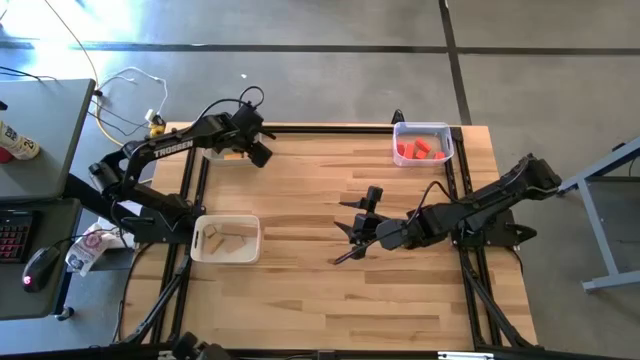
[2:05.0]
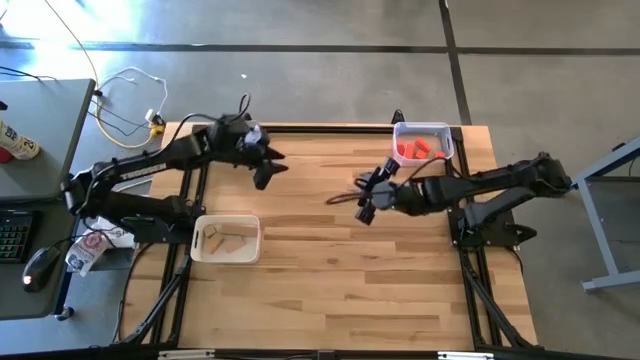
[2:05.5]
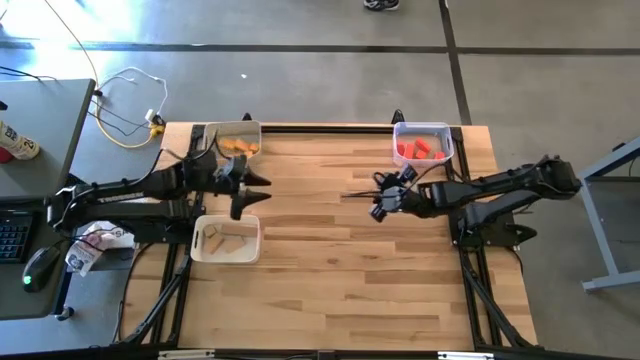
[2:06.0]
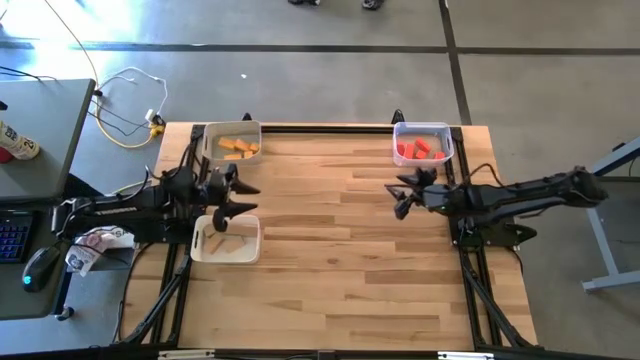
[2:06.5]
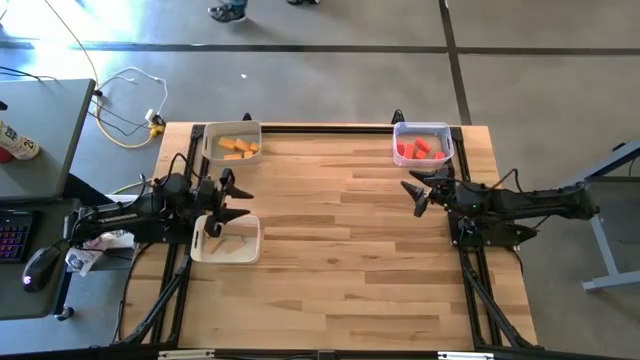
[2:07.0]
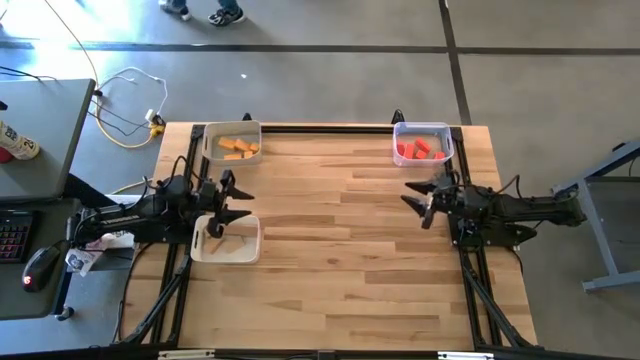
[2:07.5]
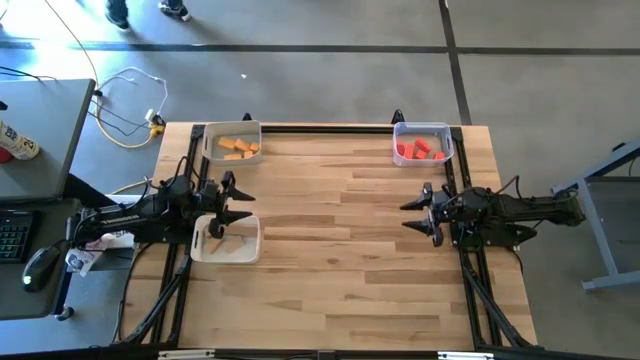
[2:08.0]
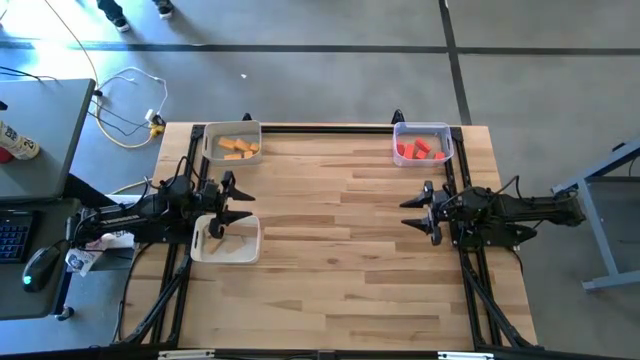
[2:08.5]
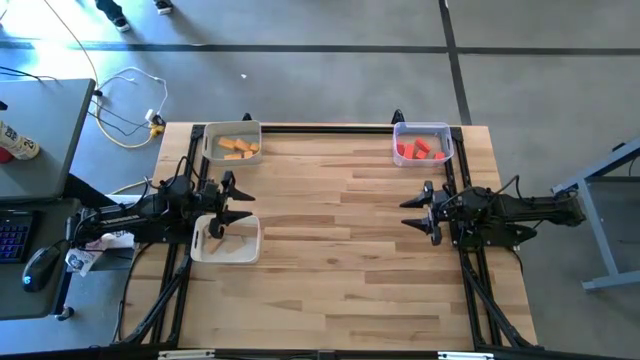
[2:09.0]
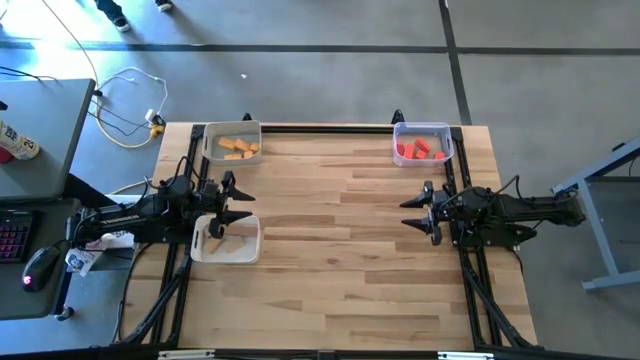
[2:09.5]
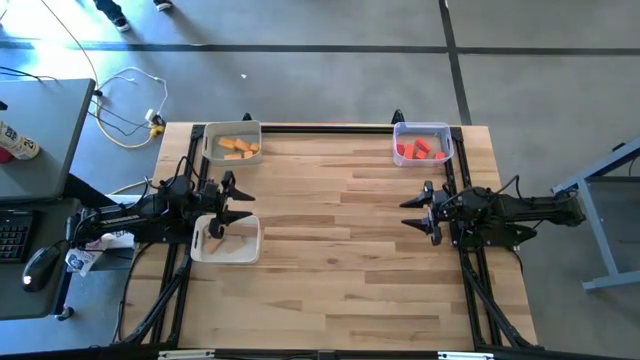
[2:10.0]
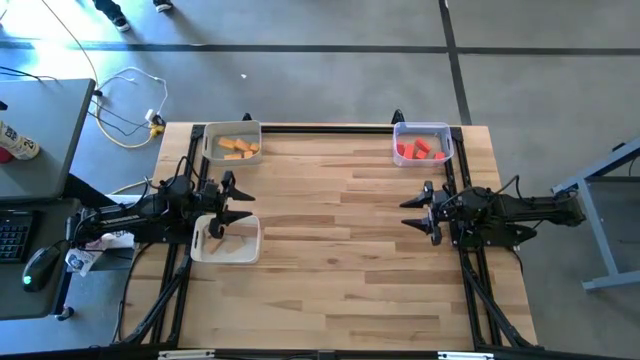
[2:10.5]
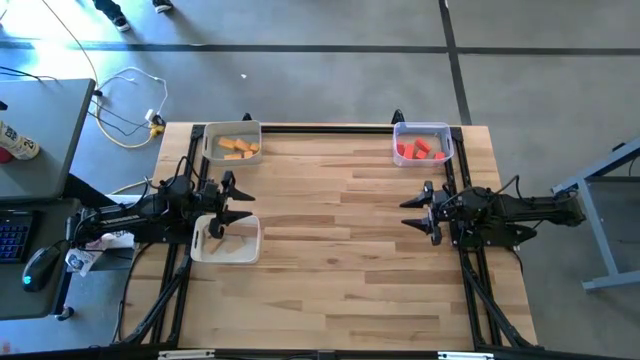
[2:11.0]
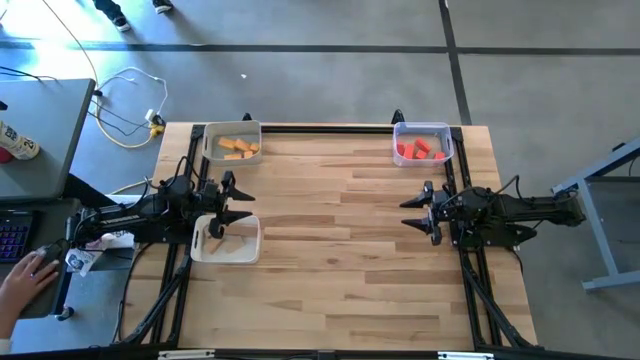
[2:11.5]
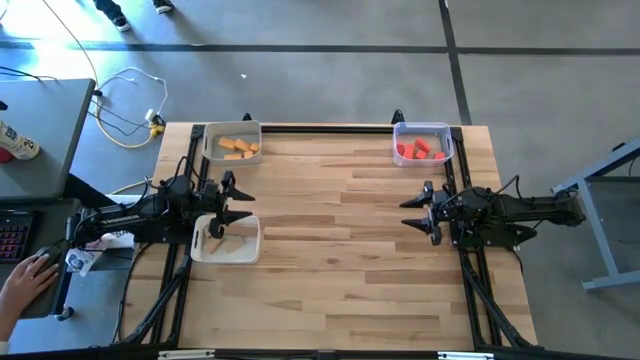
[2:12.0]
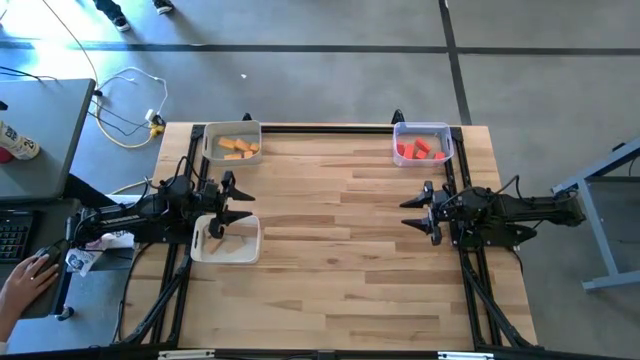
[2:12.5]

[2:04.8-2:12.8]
Task: Sort & place blocks by color
Return to Home Position

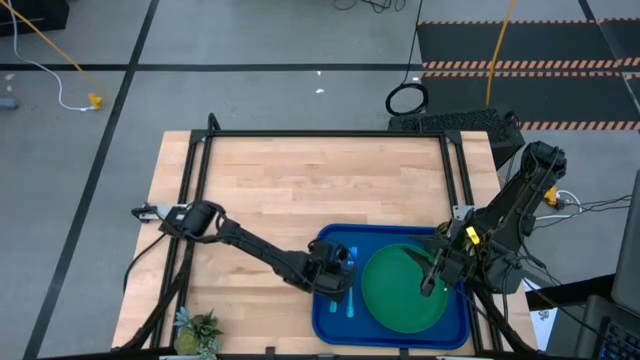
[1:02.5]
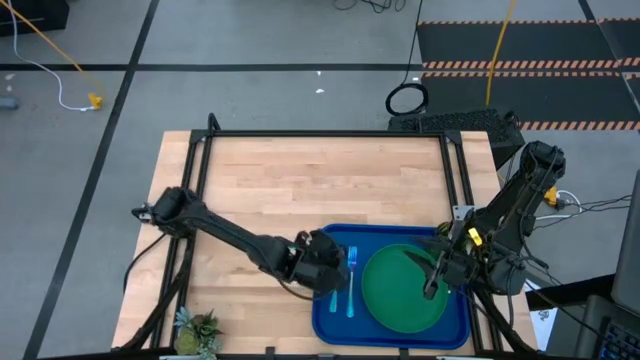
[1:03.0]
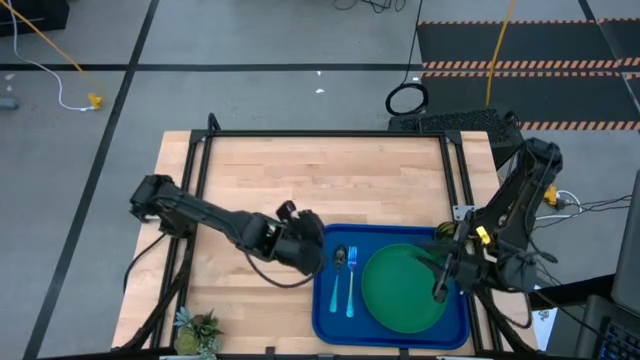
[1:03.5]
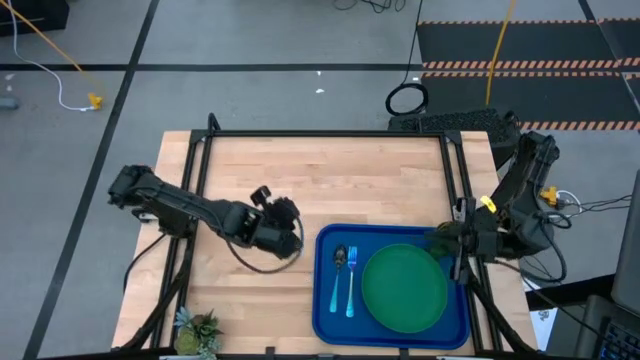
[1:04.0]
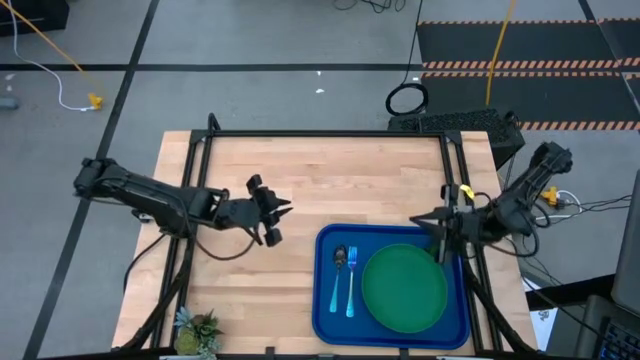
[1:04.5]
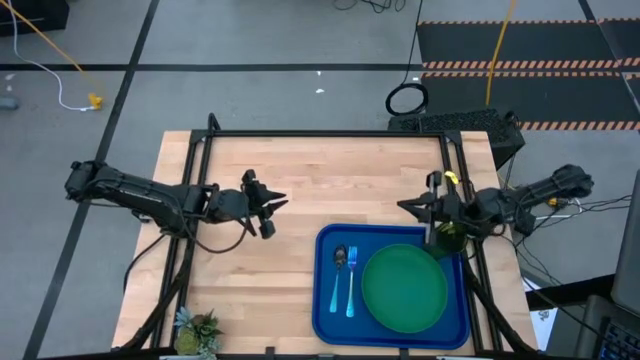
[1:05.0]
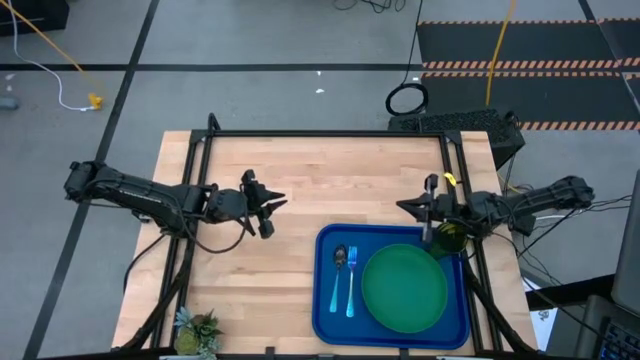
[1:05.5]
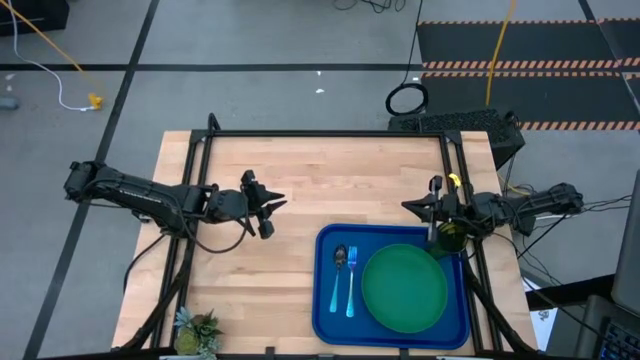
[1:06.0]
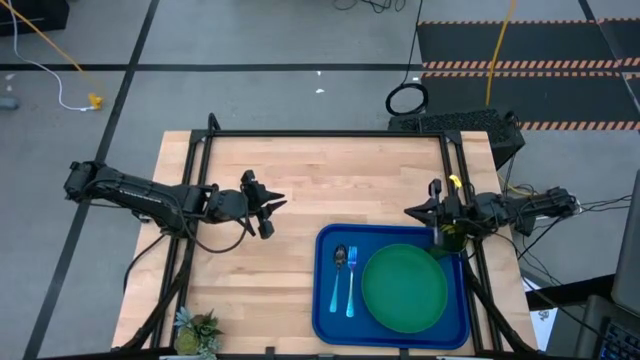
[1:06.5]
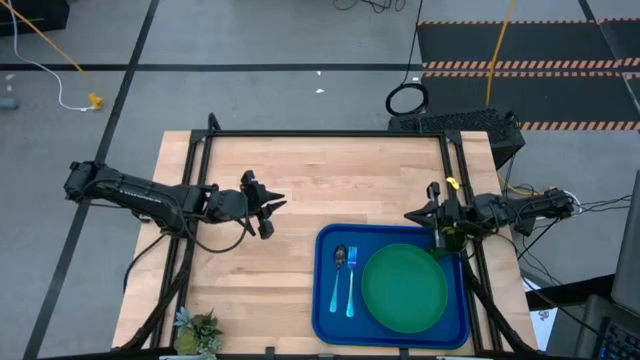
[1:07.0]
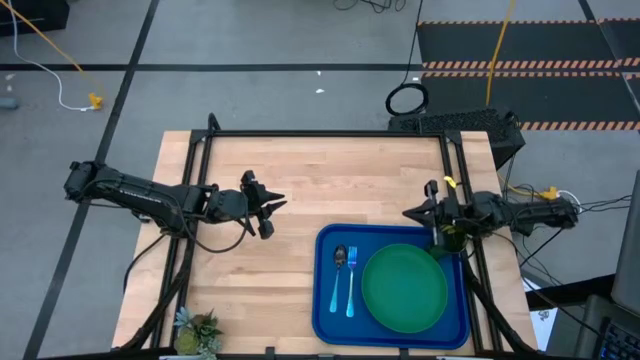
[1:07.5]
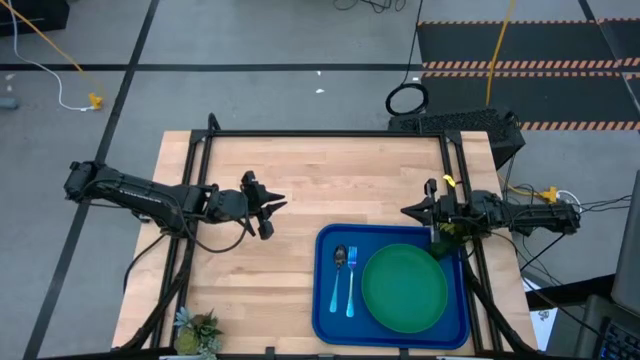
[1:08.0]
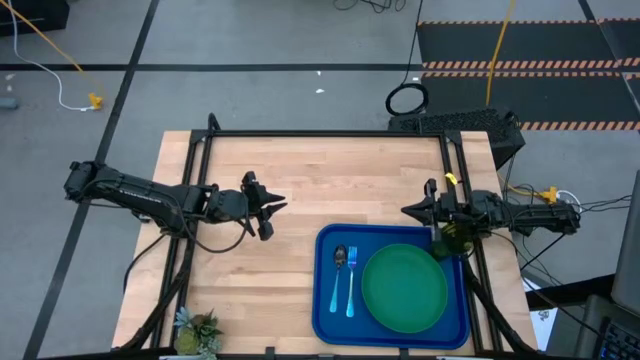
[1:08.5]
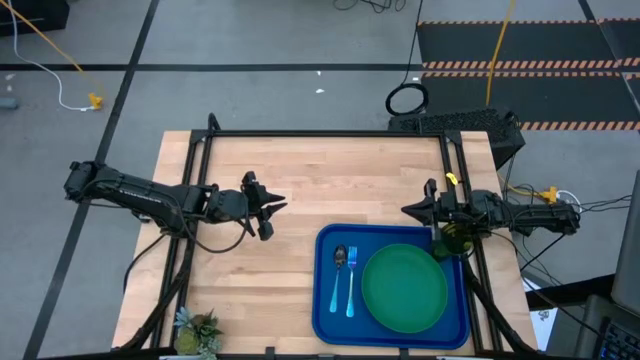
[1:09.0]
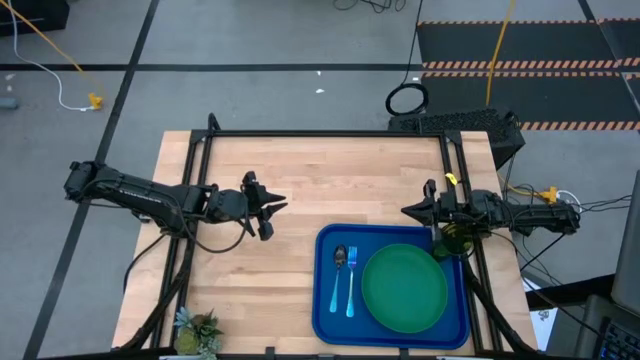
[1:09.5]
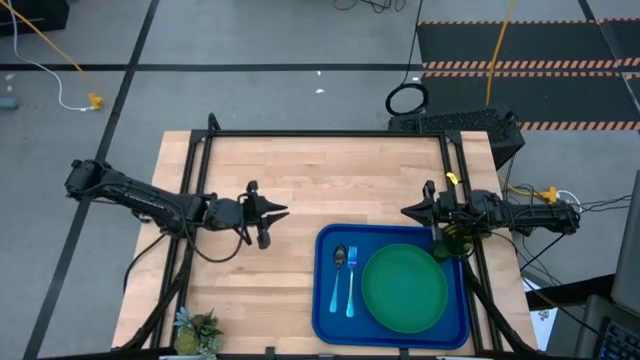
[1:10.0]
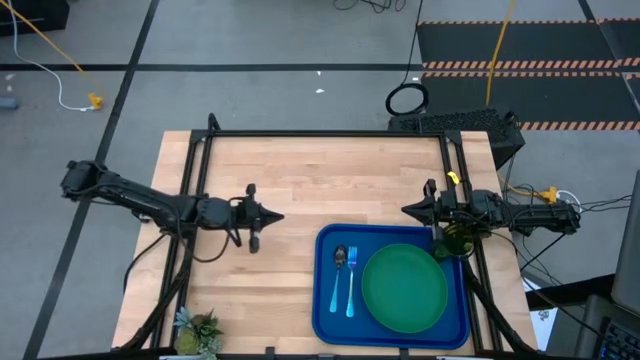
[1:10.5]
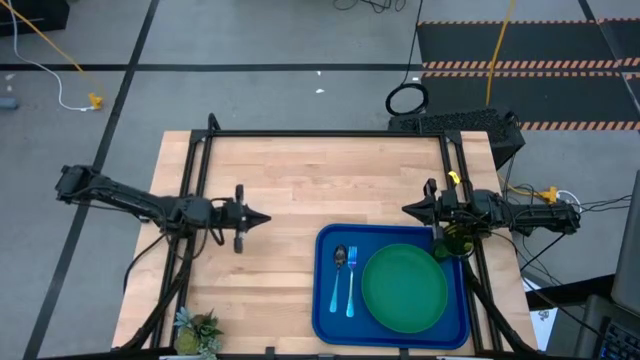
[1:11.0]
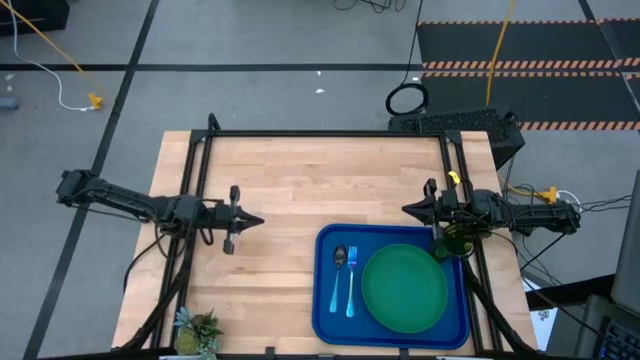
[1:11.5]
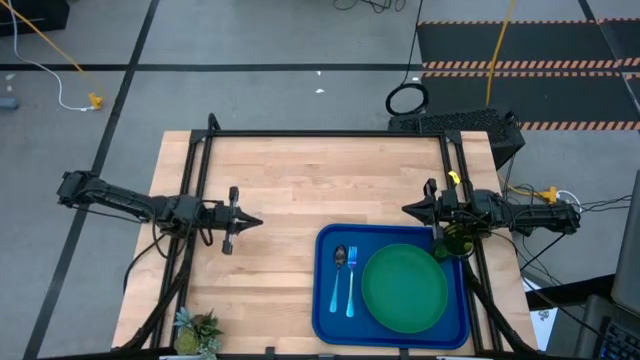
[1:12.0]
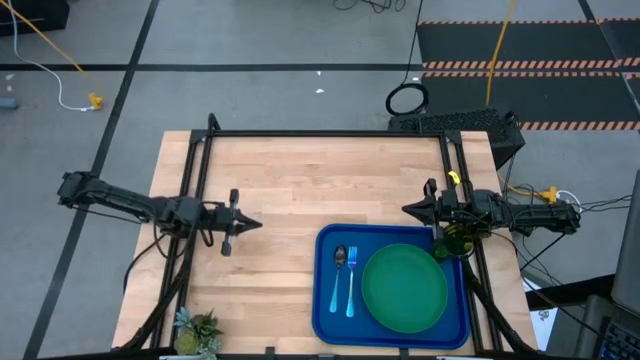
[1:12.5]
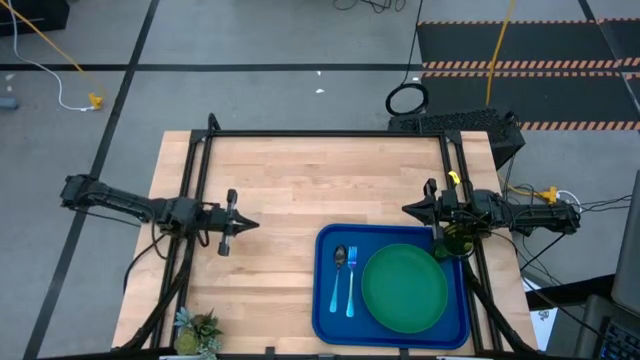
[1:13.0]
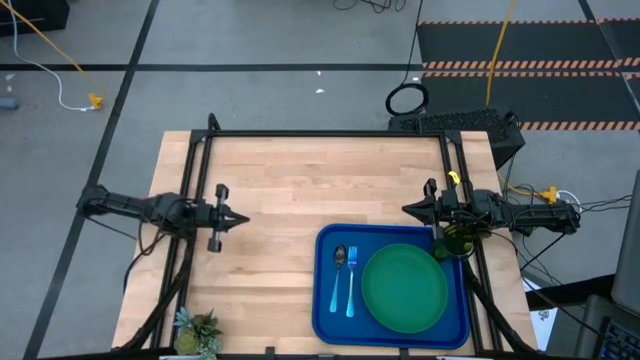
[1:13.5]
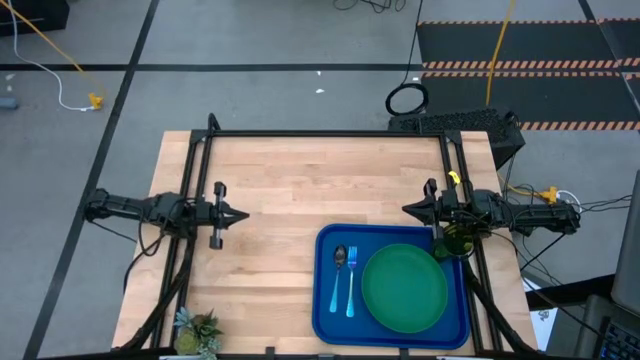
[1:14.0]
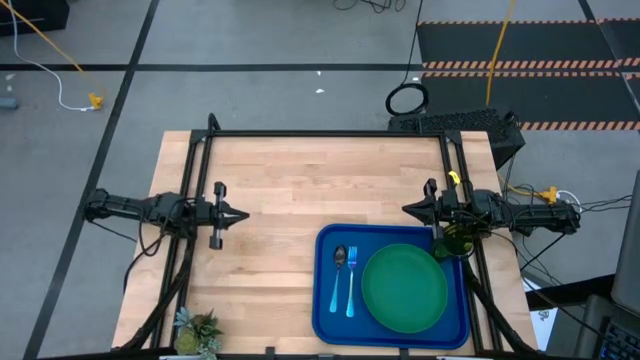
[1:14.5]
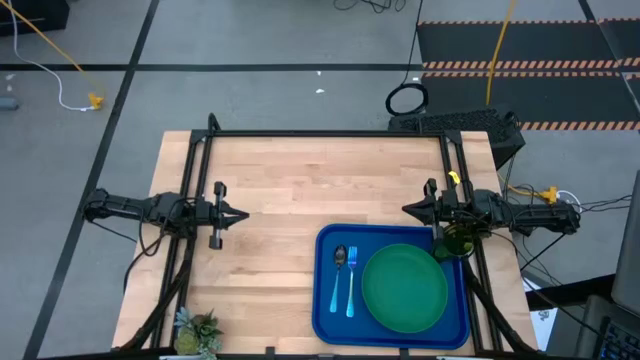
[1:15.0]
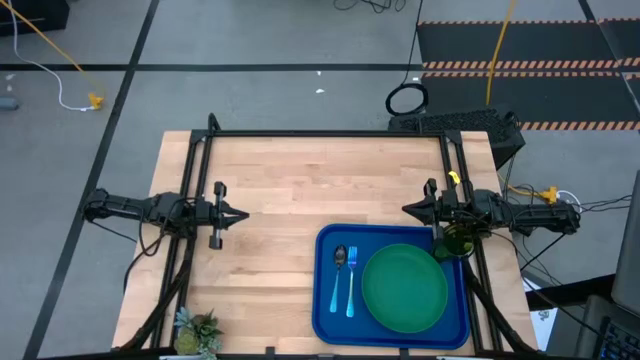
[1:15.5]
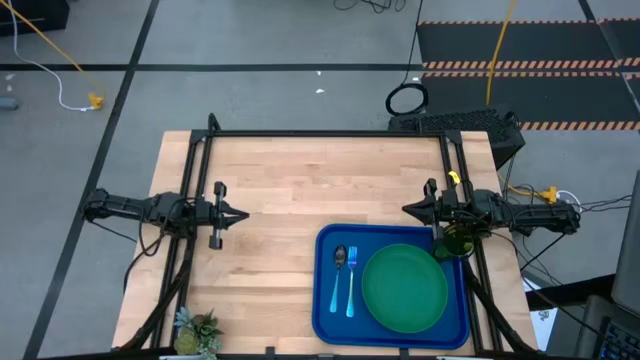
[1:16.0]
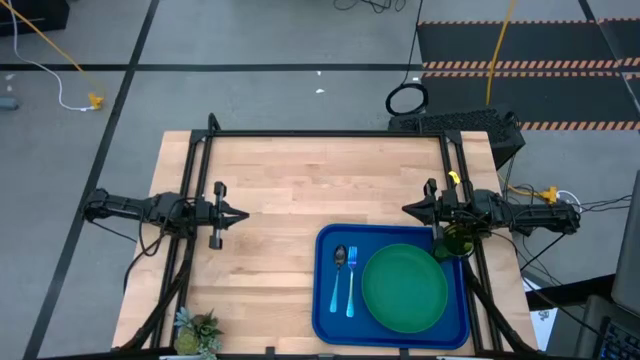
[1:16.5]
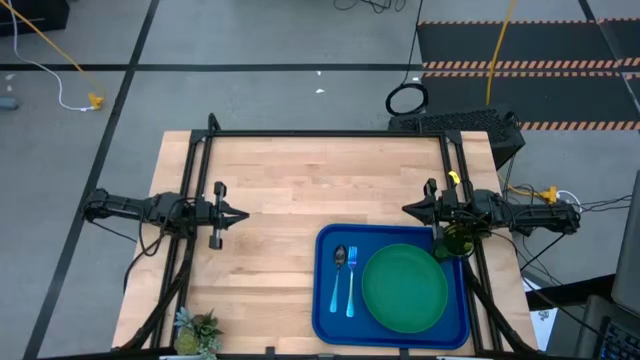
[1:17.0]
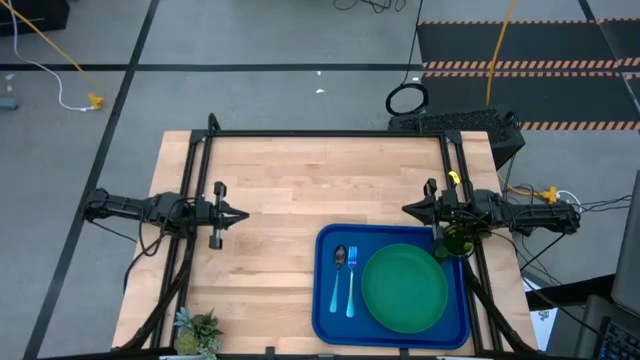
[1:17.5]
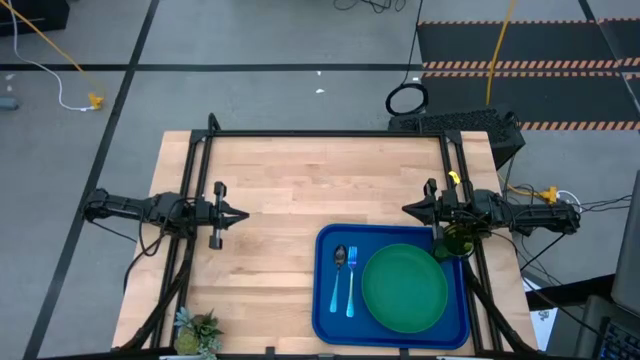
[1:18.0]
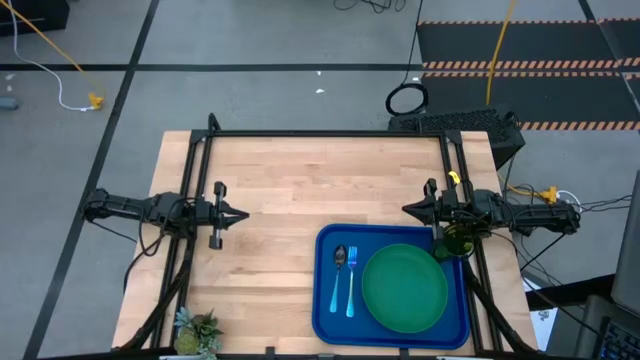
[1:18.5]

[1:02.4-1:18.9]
Task: Pick and place plate/cup/fork/spoon on tray
Return to Home Position
